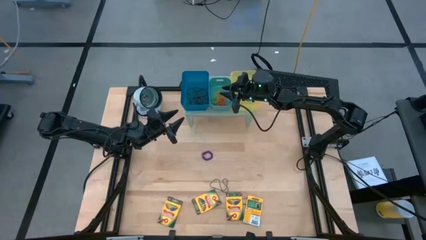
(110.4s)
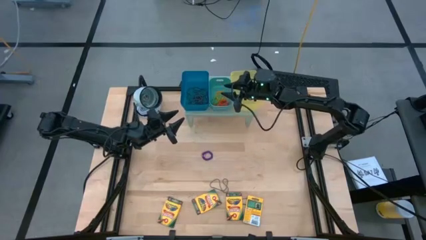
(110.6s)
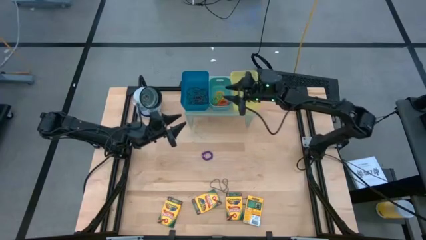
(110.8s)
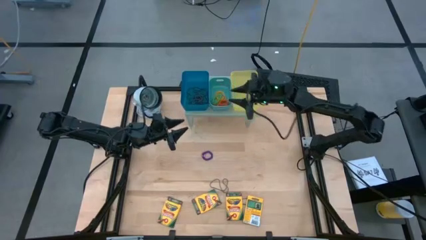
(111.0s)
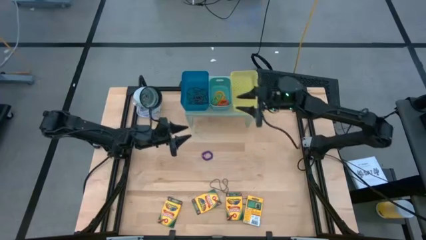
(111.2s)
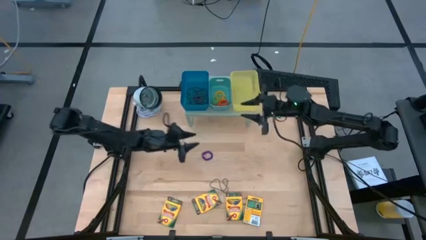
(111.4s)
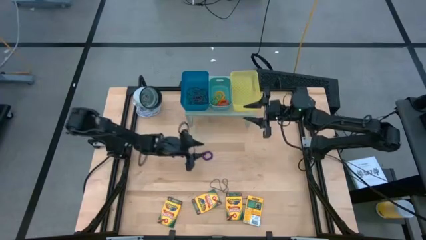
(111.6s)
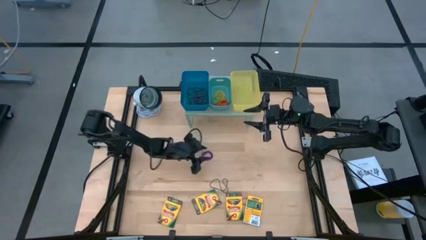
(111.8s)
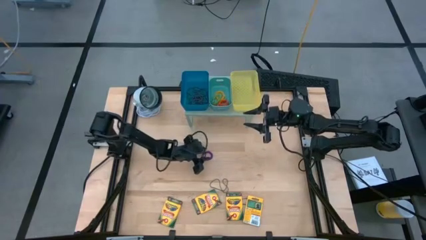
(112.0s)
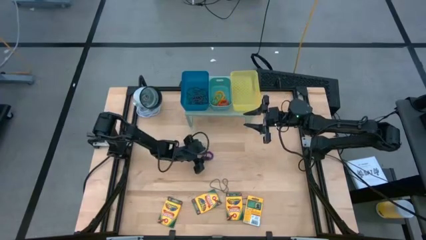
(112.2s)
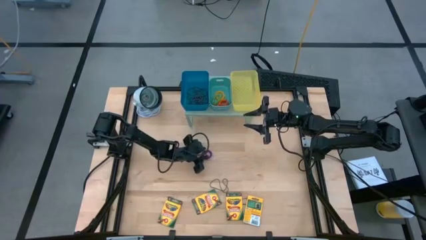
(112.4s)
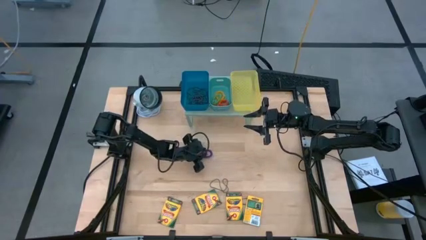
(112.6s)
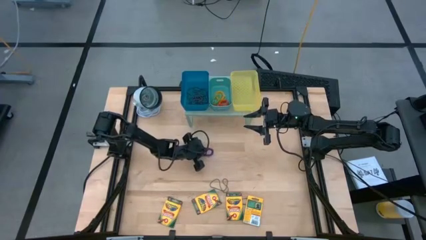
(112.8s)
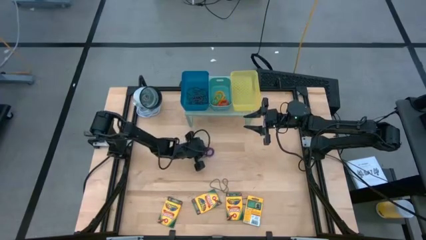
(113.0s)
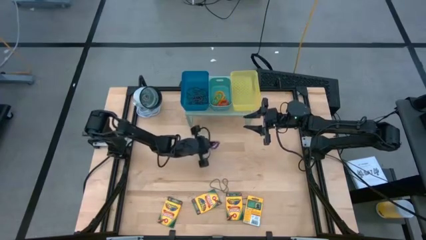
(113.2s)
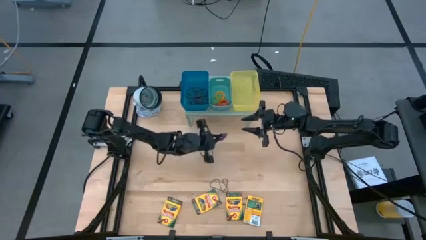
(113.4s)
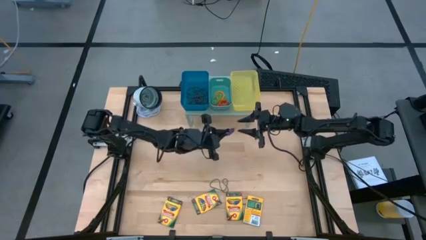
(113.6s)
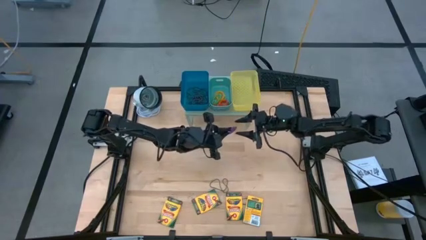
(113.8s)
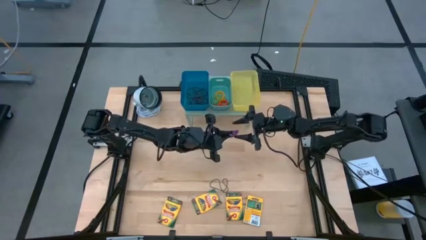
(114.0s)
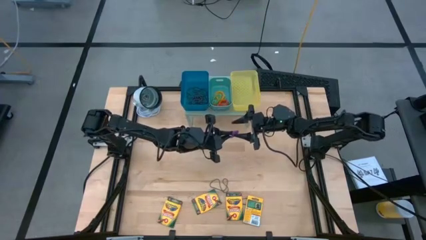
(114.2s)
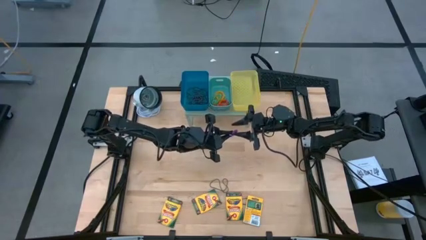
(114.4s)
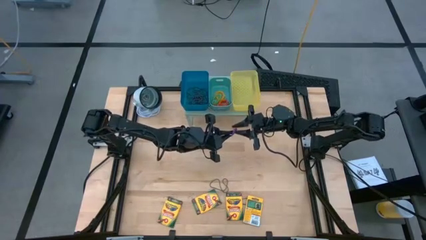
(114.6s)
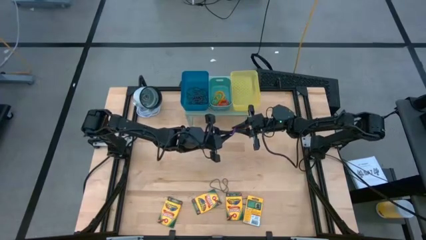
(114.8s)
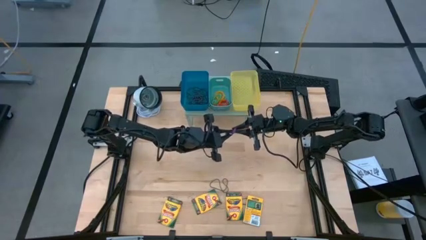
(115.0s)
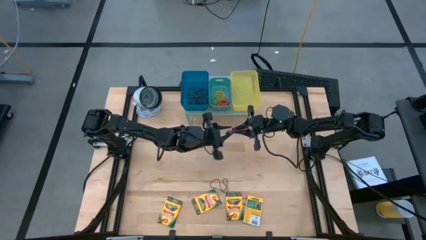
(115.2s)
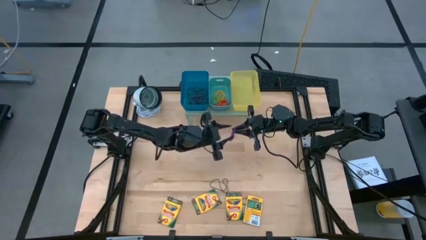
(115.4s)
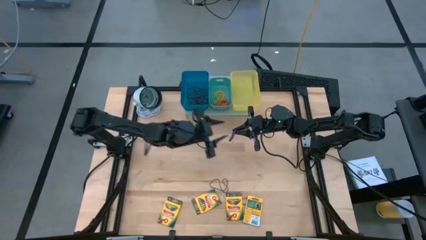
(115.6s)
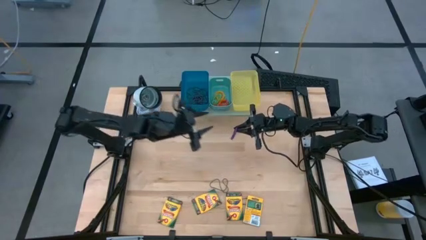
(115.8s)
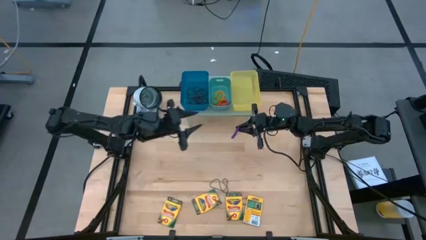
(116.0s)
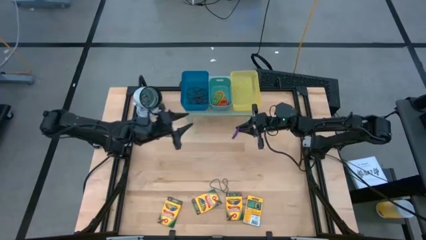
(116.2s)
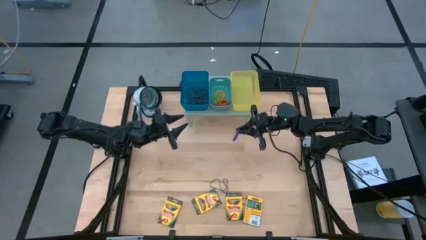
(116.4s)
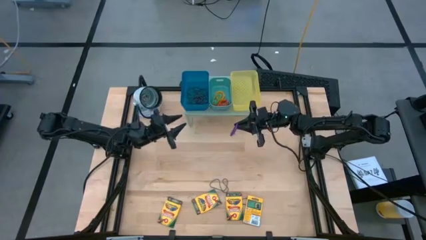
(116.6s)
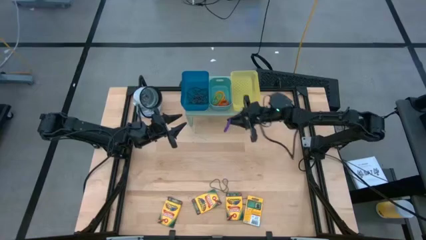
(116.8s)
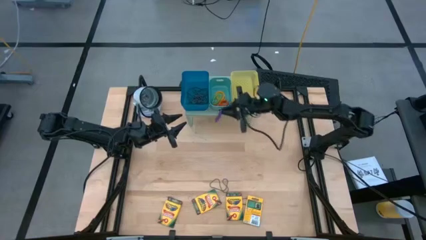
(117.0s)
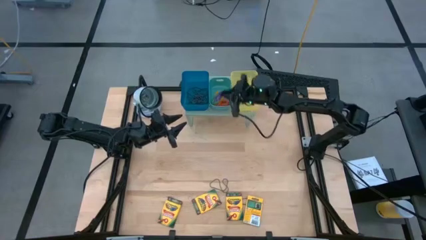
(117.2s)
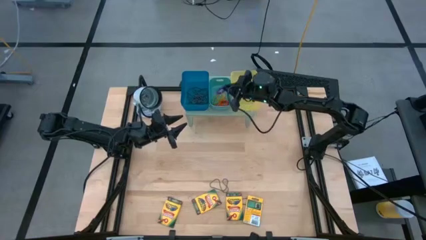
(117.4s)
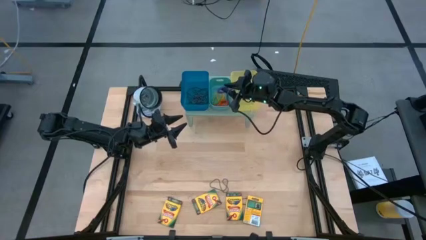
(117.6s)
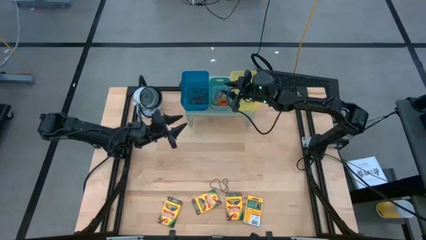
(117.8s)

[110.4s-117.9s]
Task: Pick & Place Office Desk Supplies
Put the purple spring keychain into the green bin on the shelf

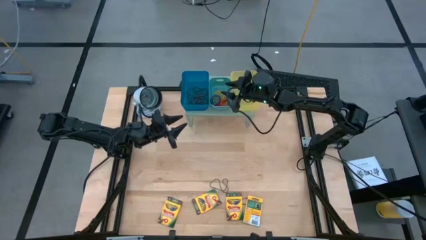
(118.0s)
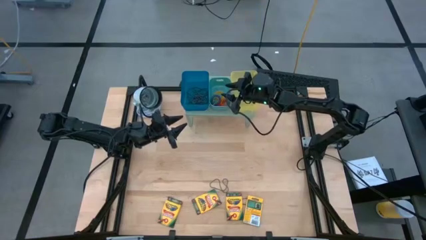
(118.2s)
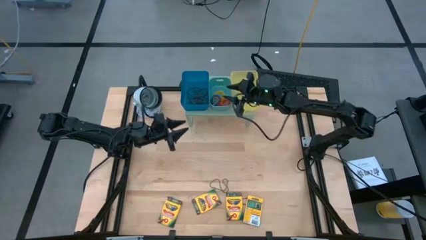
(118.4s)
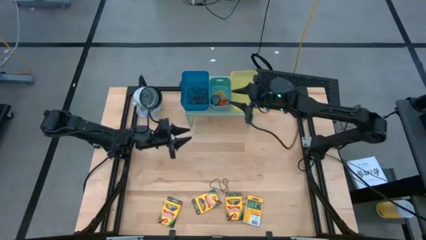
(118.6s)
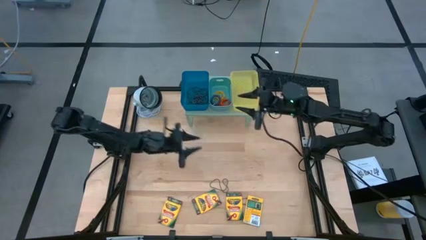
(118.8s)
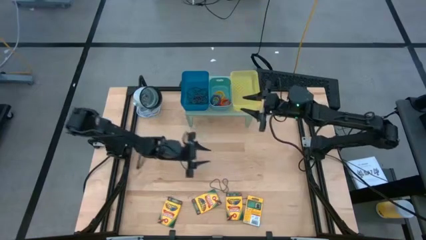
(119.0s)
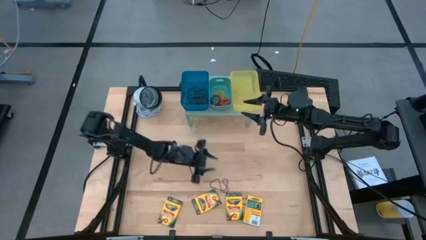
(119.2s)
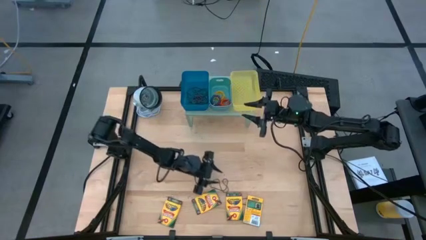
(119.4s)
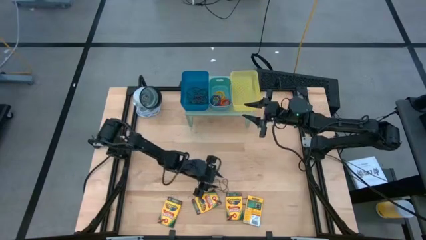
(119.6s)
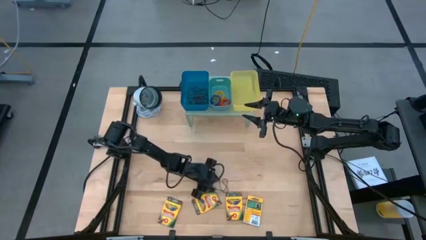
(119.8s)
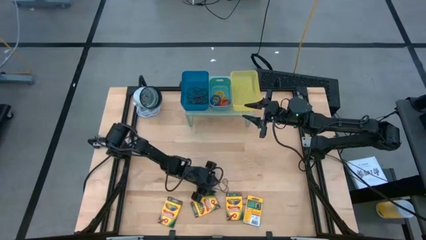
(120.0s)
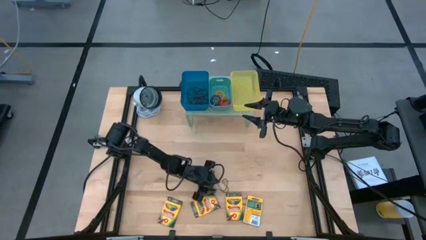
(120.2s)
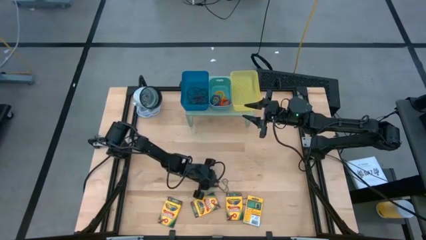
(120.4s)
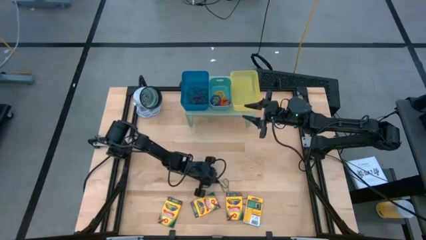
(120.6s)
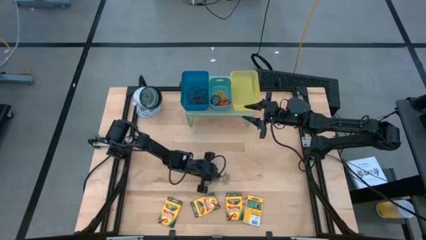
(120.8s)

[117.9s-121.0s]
Put the purple rubber band into the blue bin on the shelf

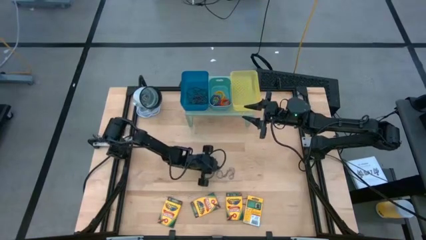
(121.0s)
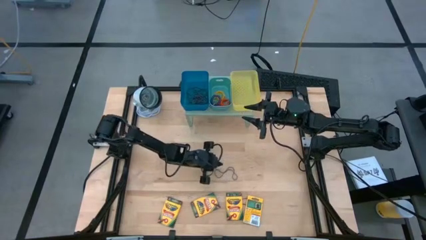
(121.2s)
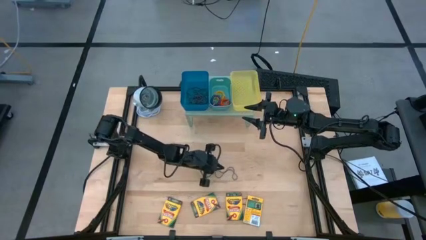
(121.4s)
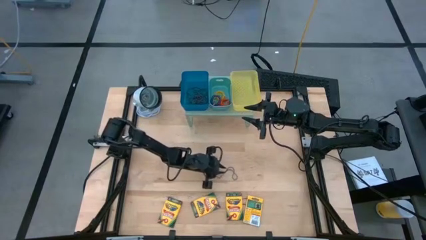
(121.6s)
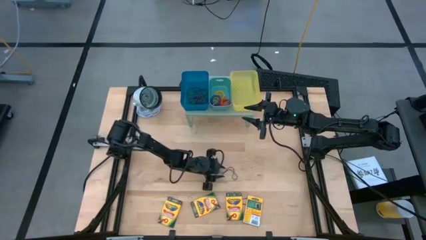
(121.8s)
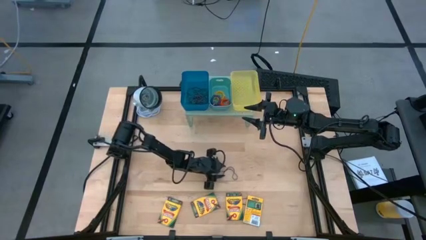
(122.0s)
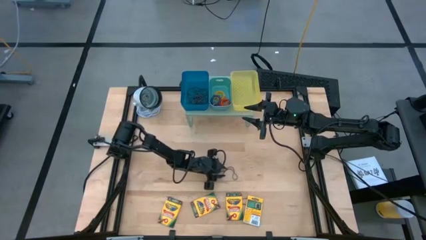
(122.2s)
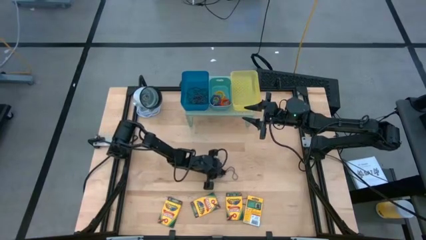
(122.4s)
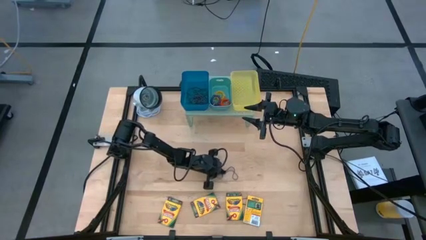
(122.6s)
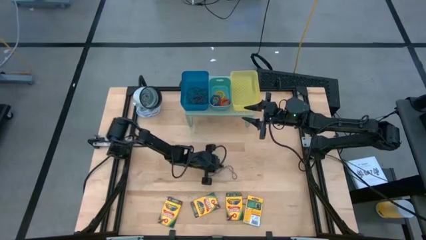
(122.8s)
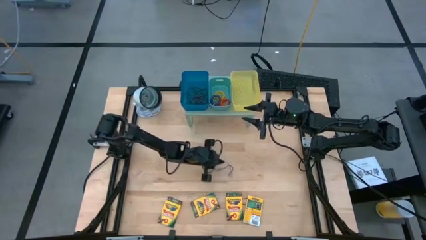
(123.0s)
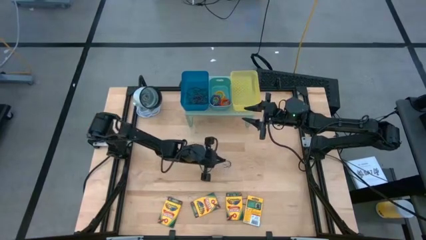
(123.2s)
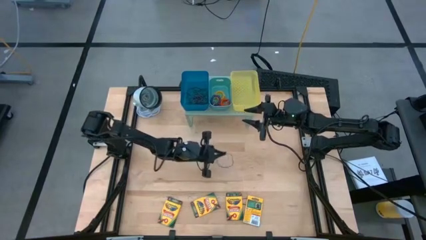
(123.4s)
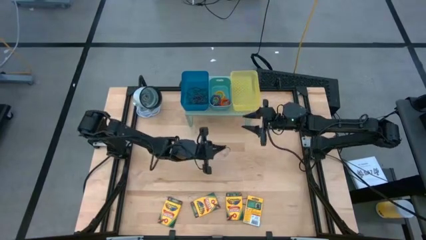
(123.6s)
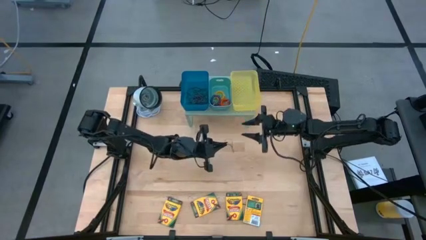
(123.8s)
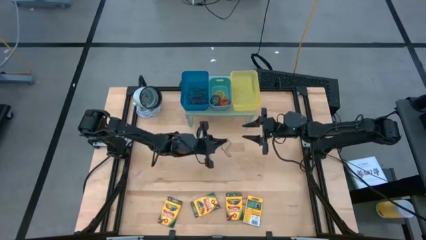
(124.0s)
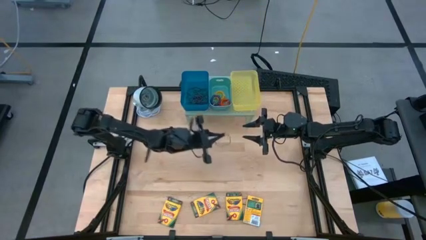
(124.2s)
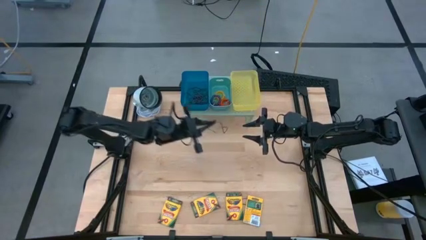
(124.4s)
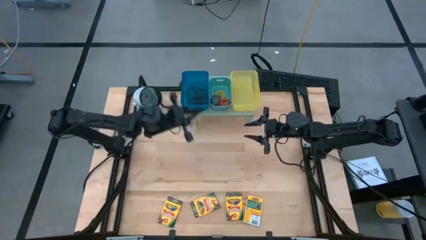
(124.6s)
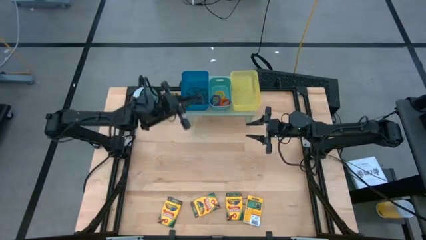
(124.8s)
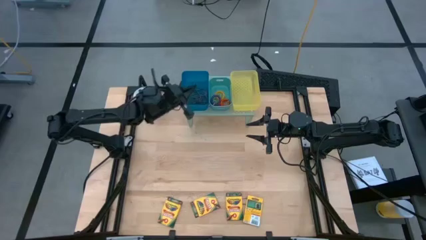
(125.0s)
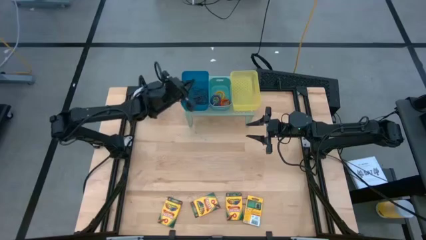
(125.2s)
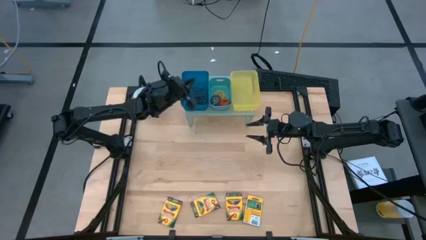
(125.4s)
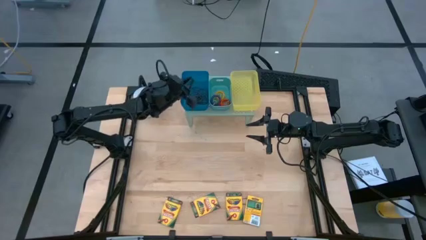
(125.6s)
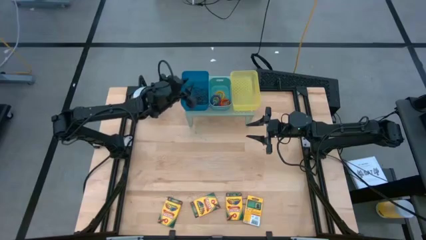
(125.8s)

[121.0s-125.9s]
Put the purple rubber band into the blue bin on the shelf

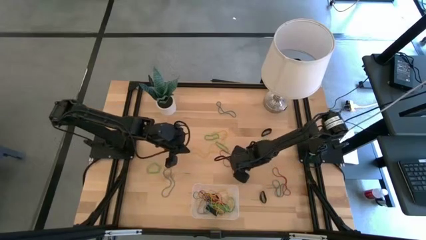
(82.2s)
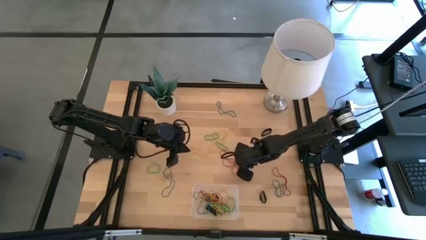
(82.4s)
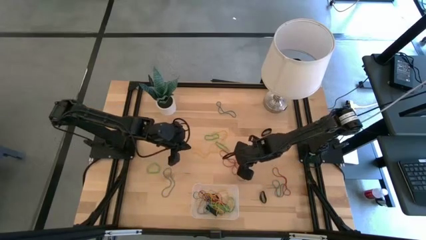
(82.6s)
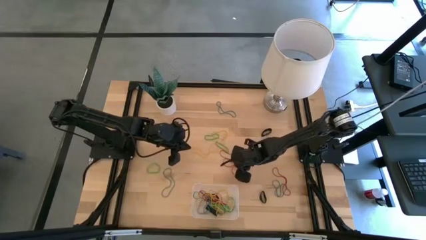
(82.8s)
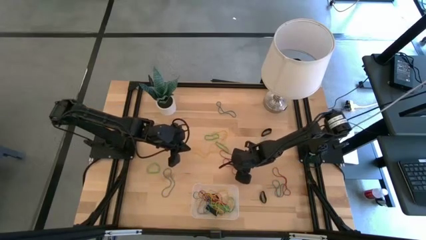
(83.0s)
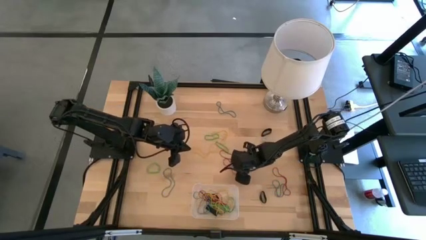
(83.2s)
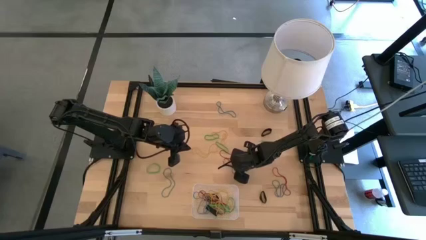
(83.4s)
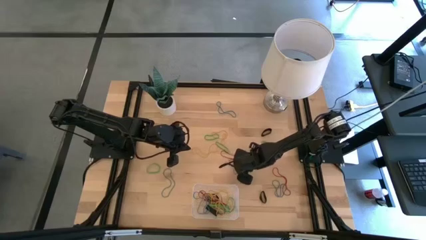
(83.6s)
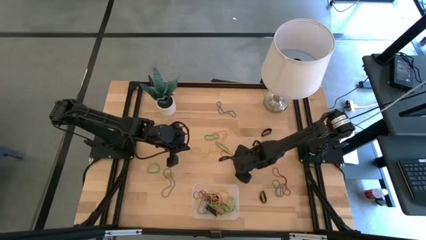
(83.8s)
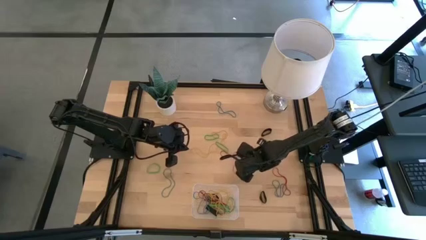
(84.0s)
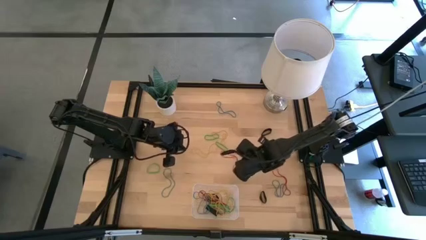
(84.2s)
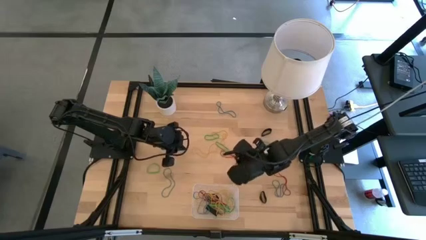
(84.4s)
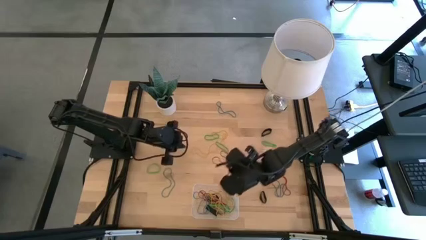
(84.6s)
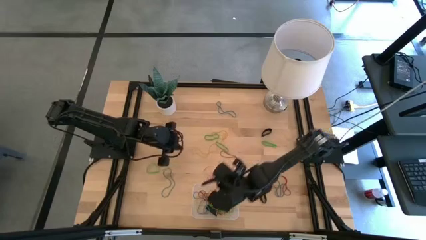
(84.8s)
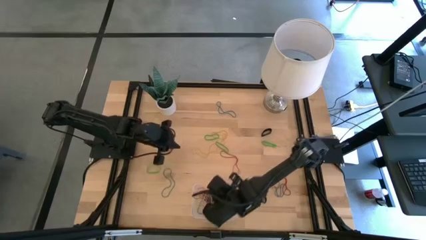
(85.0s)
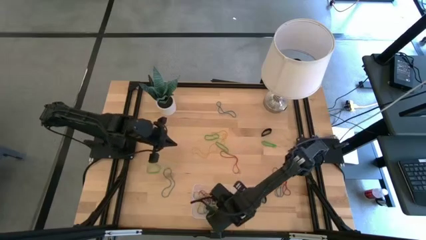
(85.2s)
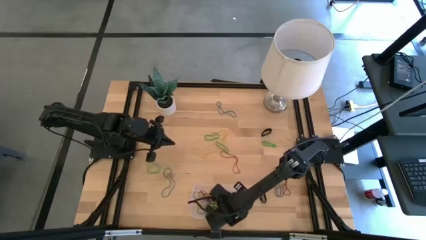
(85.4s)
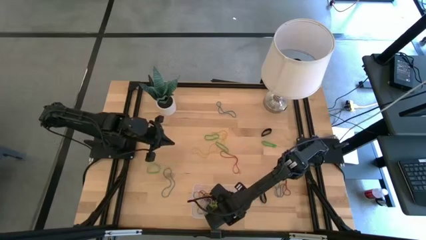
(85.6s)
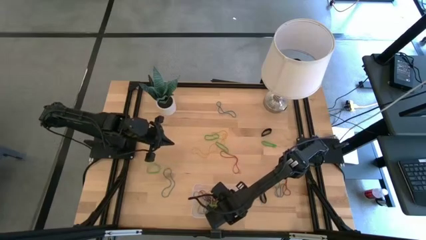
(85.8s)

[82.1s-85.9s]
Task: Pick and place rubber bands into bin
Put the red rubber band into the transparent bin
